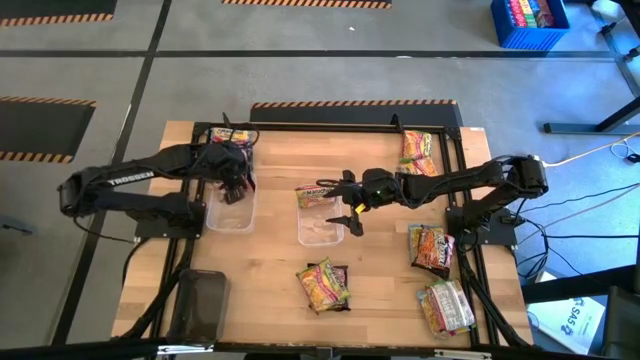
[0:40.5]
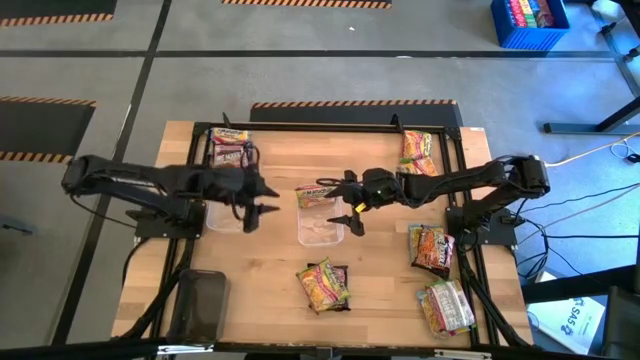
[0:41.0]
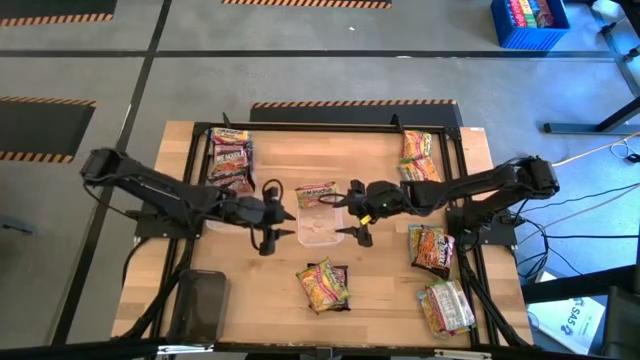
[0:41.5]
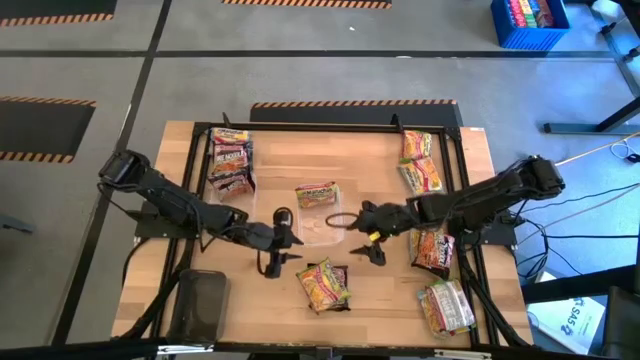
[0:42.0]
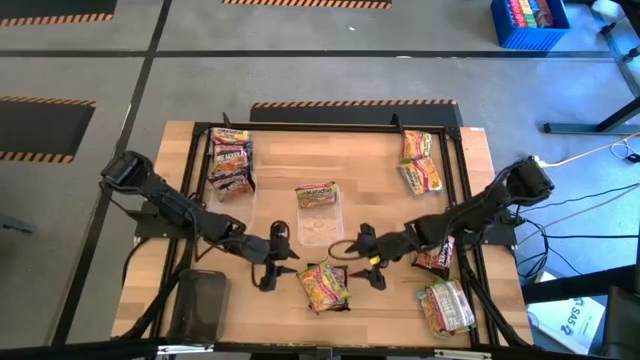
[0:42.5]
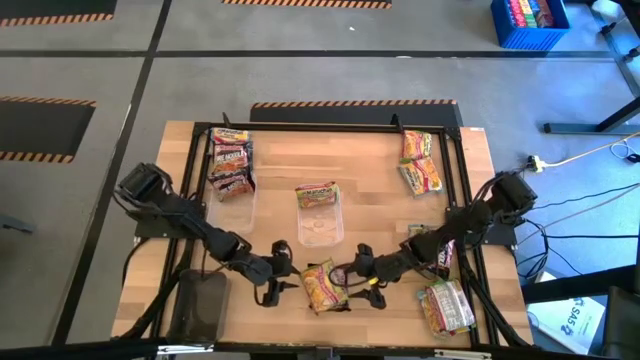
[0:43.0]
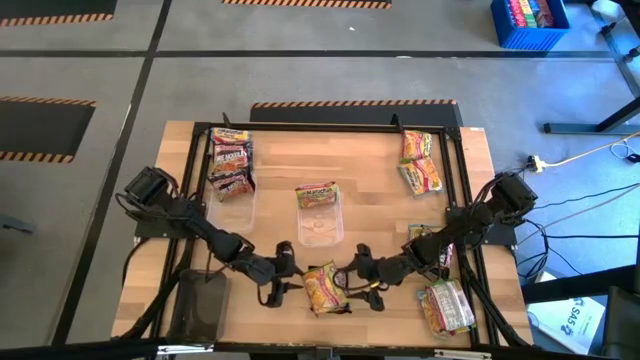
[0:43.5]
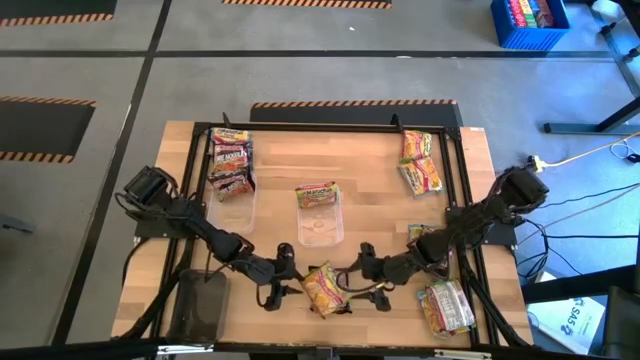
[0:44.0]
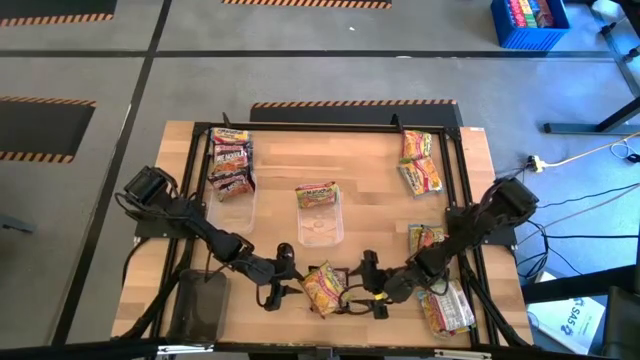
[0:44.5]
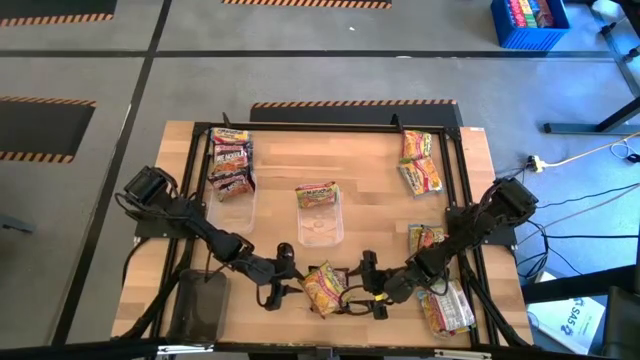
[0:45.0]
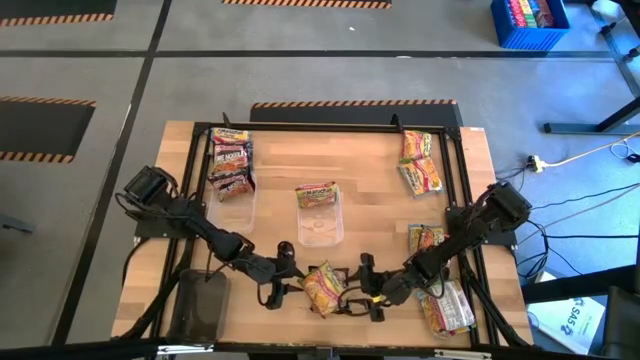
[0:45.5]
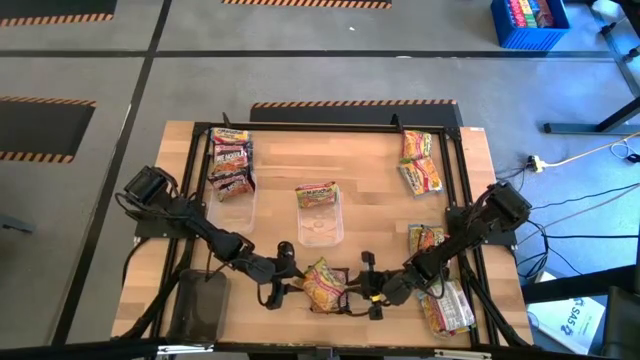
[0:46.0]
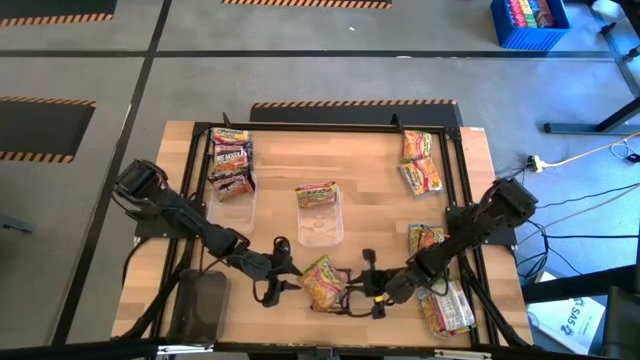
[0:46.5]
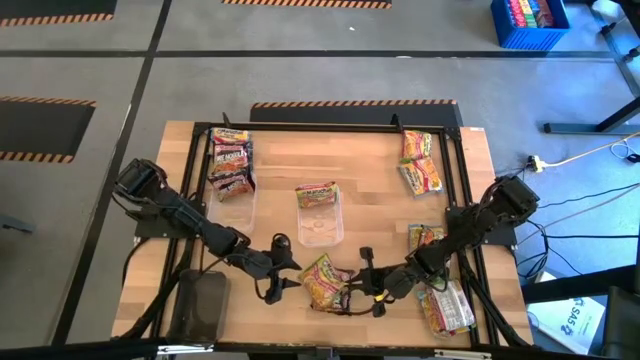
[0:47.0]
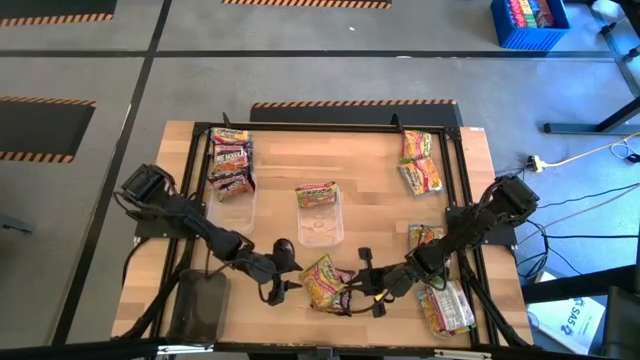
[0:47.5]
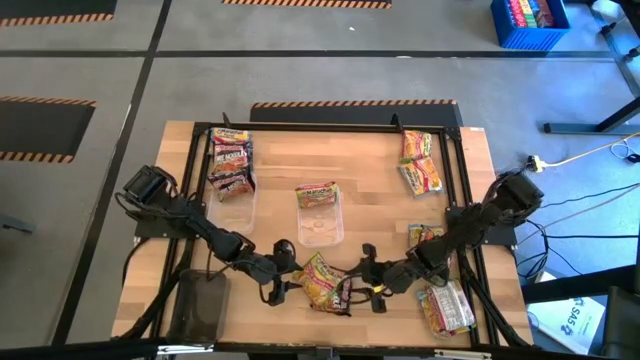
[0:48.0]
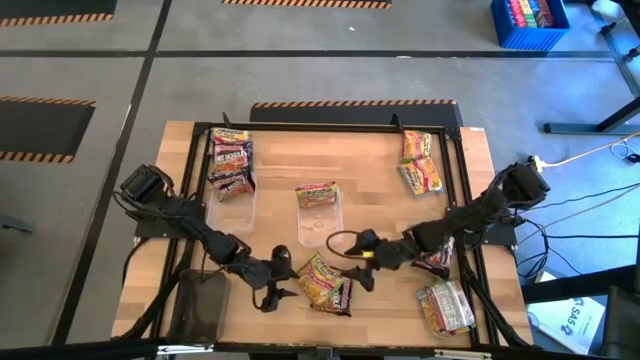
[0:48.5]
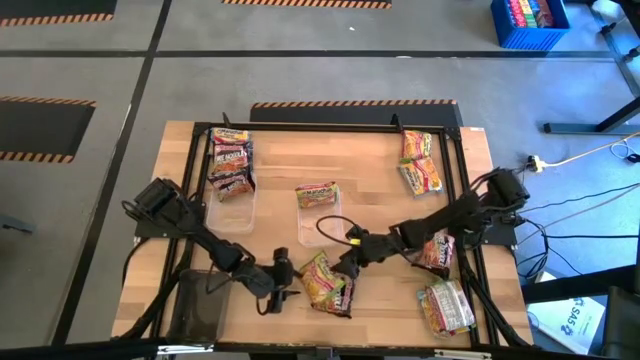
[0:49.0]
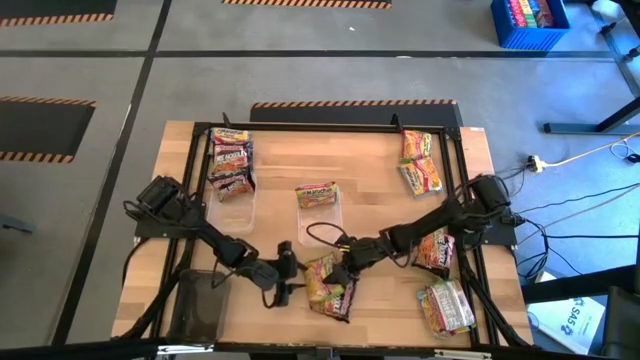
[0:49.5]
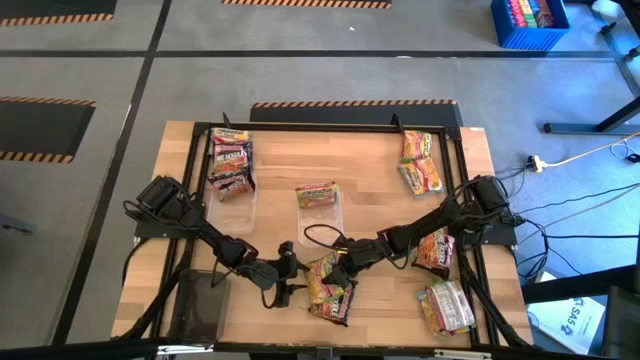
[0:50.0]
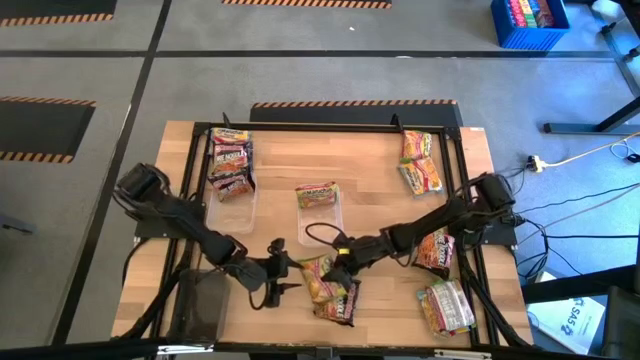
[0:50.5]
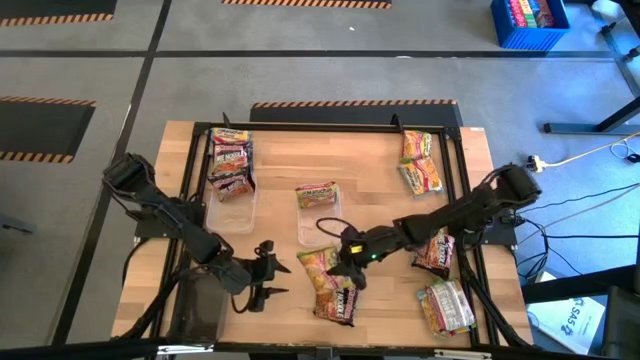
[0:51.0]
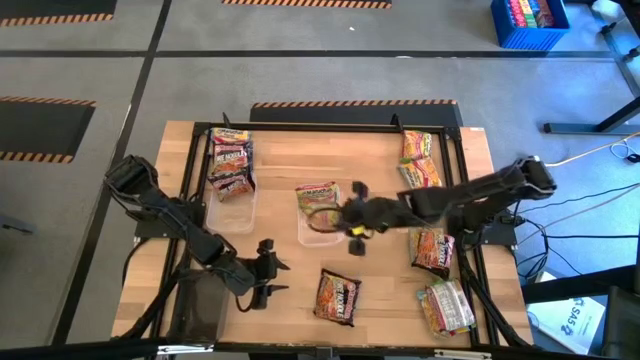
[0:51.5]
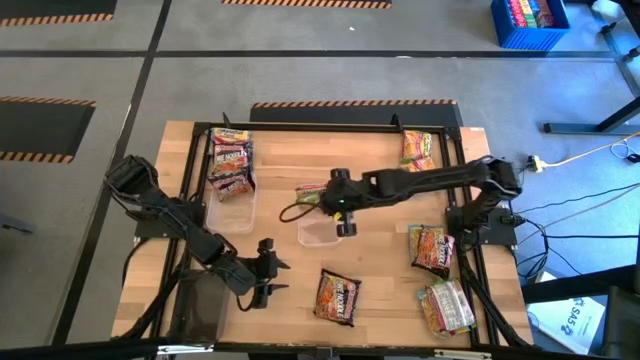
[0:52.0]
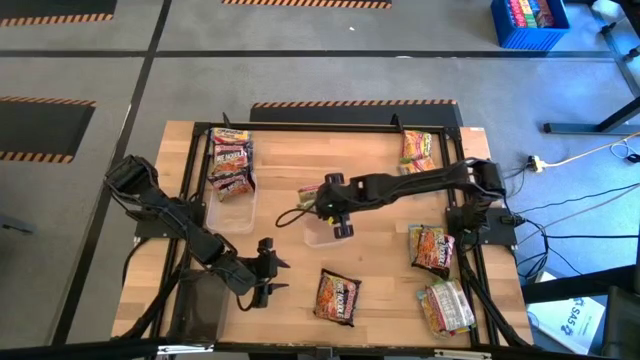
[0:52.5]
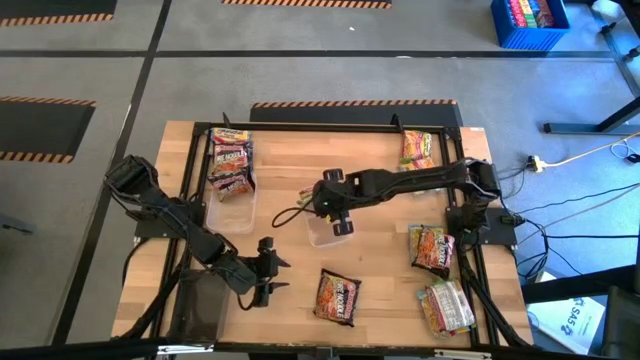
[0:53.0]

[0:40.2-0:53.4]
Task: Sort Maruchan noodles
Put the green noodle pack into the right transparent bin

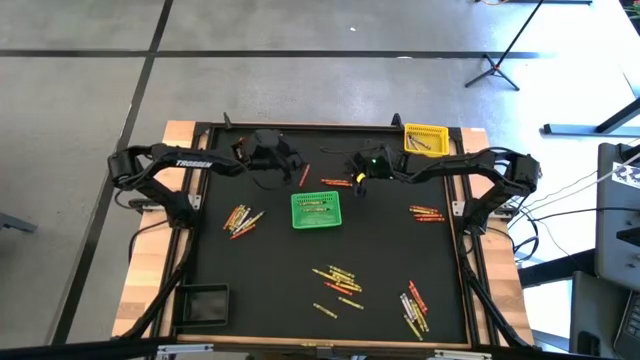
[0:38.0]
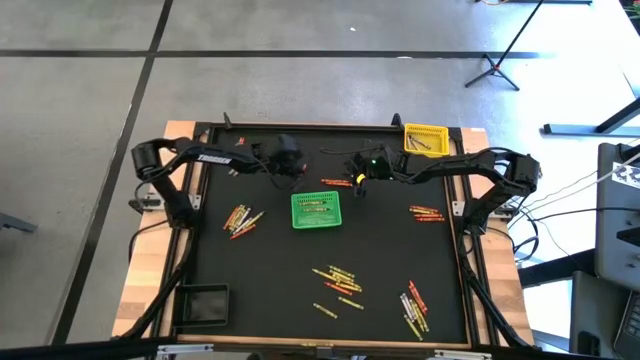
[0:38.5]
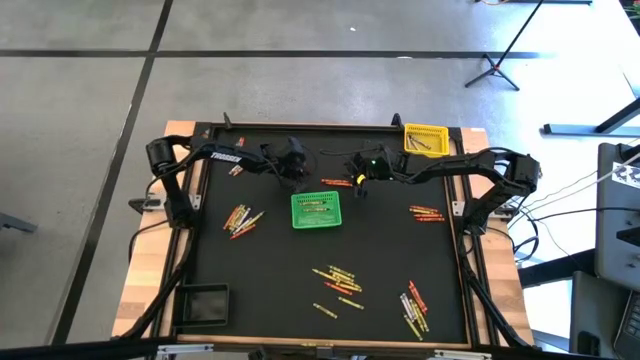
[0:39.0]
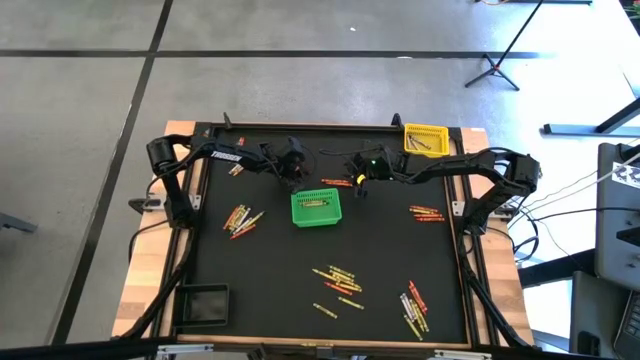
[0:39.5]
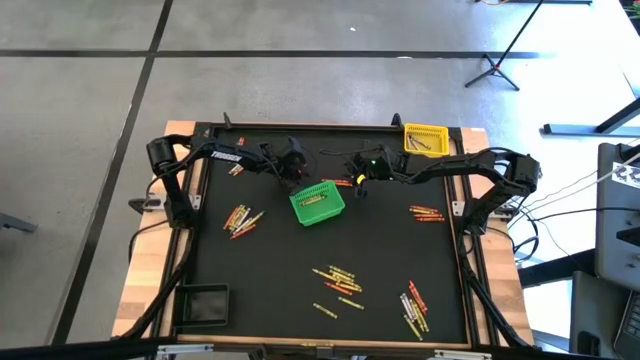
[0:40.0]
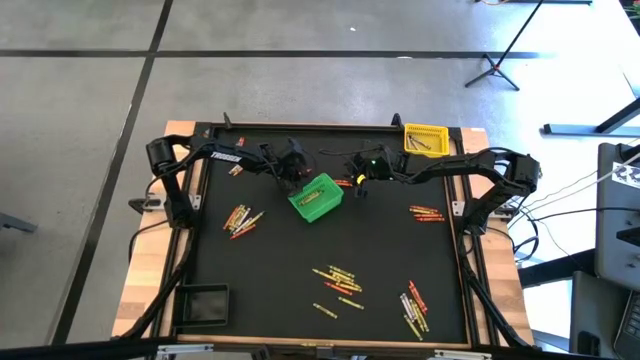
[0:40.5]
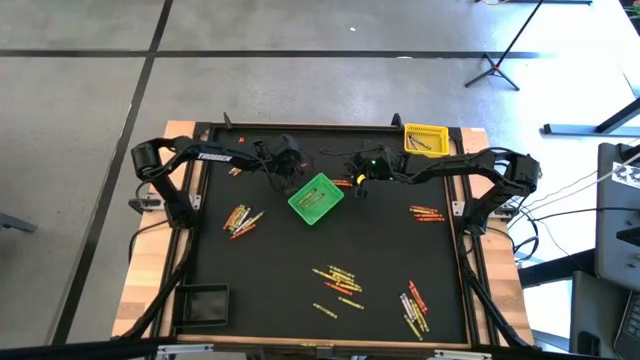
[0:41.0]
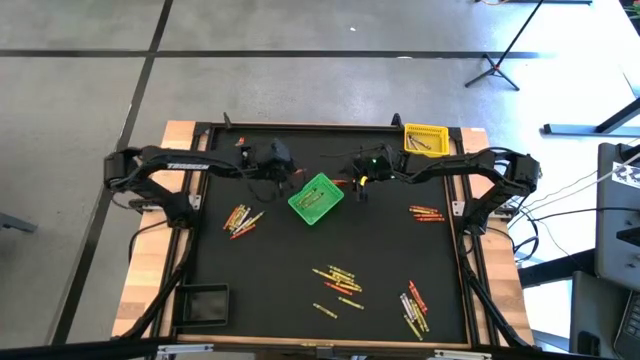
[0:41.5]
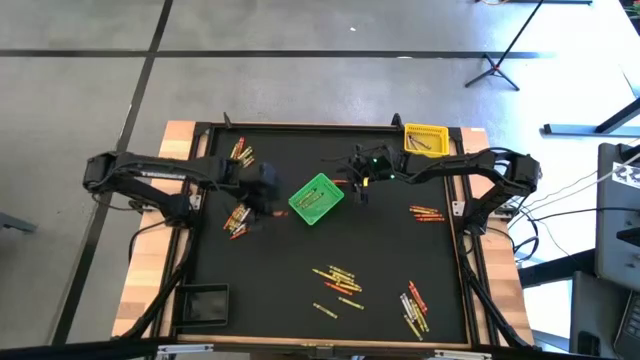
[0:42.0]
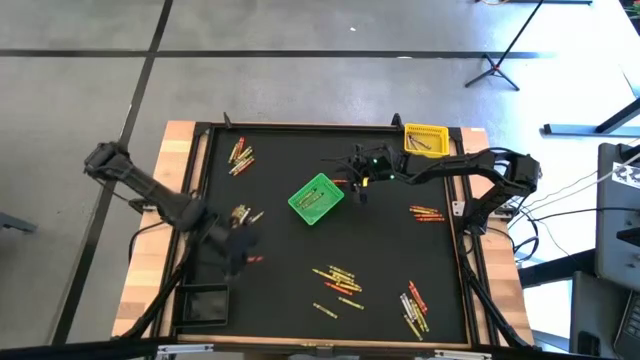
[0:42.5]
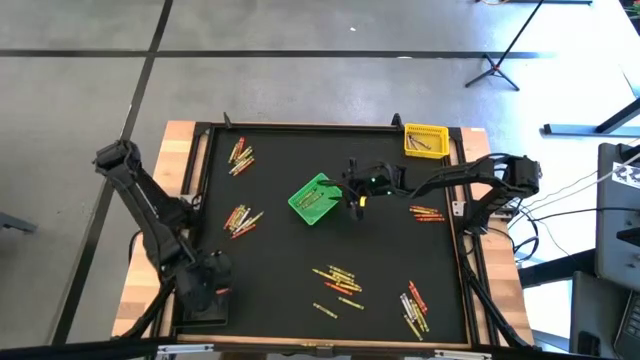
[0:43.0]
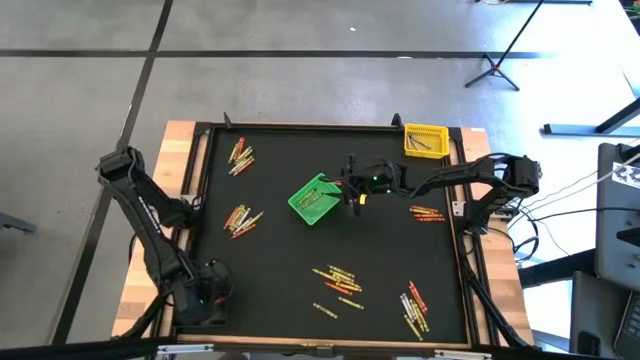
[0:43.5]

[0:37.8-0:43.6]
Task: Sort crayons
Put the orange crayon into the black bin
